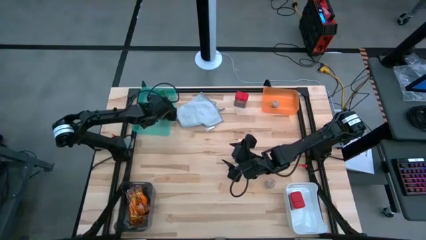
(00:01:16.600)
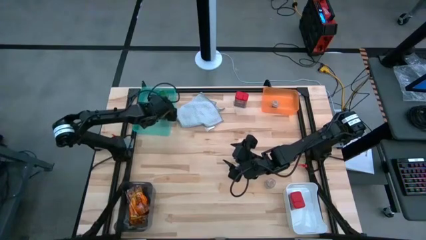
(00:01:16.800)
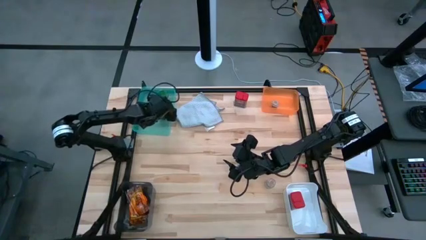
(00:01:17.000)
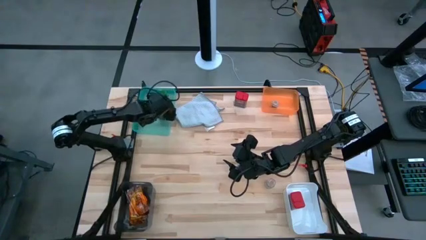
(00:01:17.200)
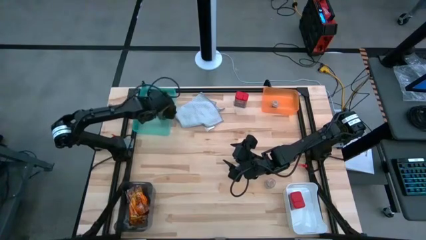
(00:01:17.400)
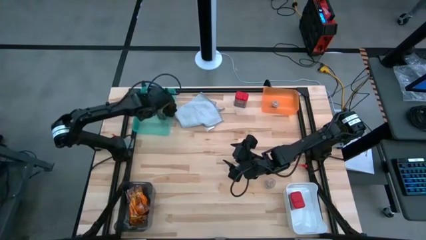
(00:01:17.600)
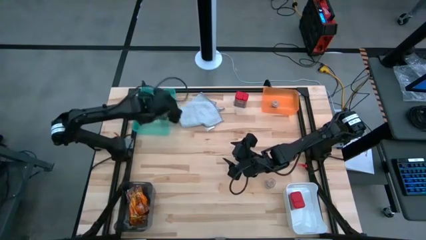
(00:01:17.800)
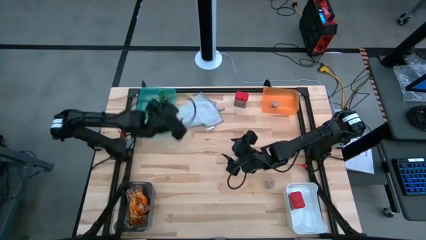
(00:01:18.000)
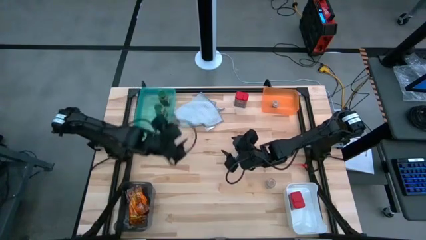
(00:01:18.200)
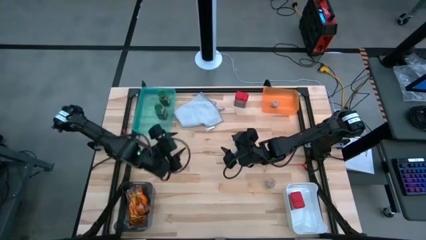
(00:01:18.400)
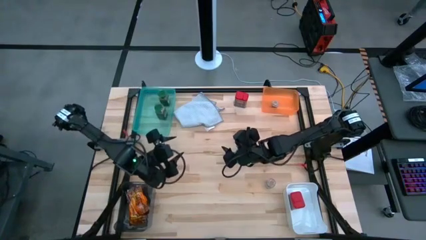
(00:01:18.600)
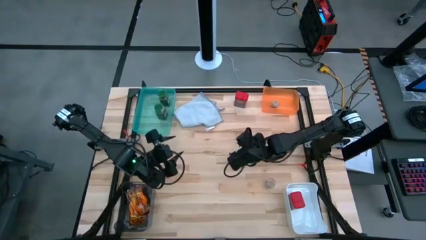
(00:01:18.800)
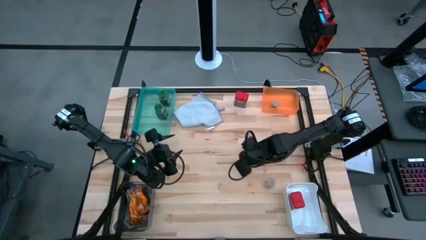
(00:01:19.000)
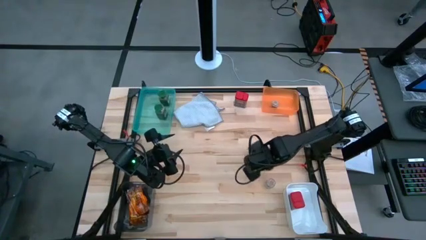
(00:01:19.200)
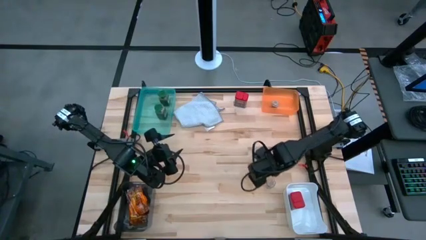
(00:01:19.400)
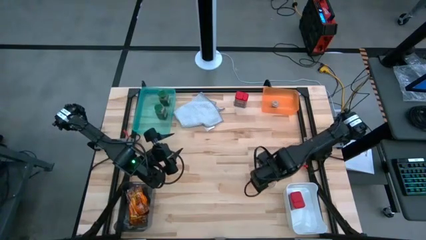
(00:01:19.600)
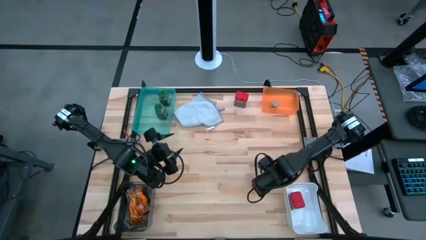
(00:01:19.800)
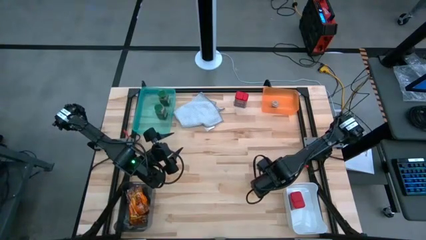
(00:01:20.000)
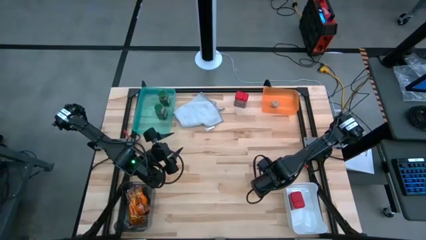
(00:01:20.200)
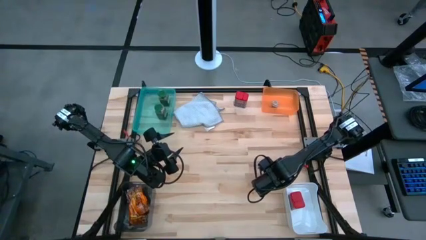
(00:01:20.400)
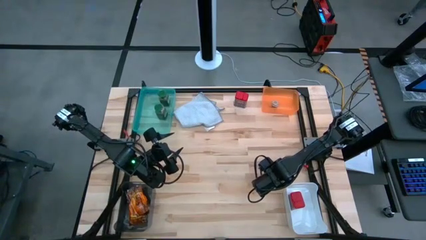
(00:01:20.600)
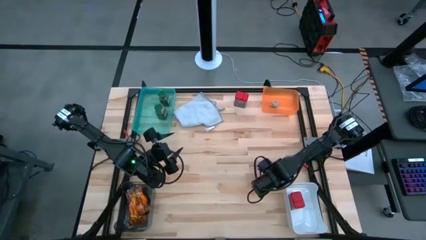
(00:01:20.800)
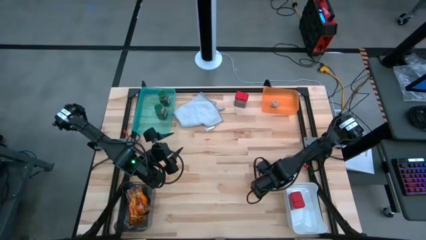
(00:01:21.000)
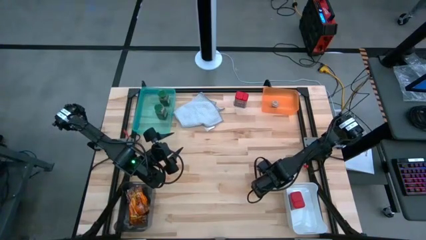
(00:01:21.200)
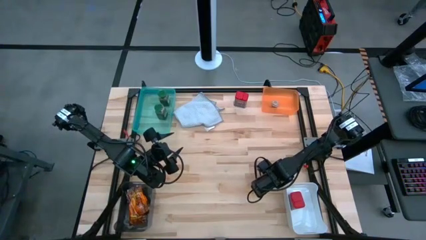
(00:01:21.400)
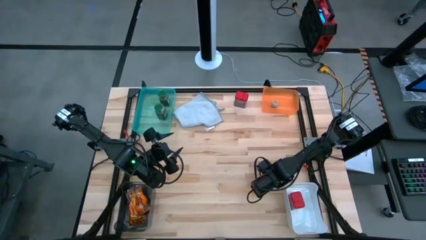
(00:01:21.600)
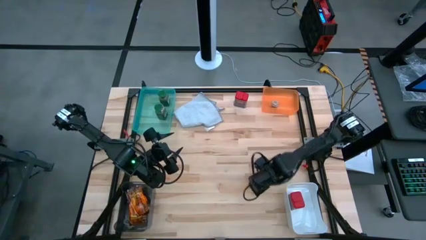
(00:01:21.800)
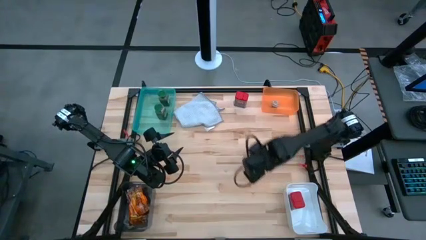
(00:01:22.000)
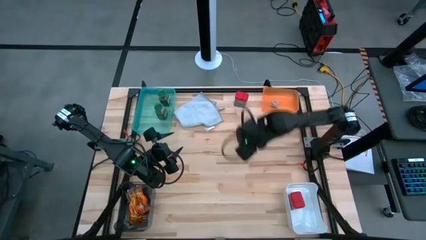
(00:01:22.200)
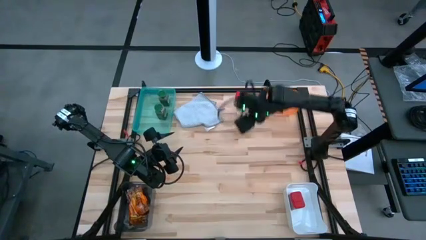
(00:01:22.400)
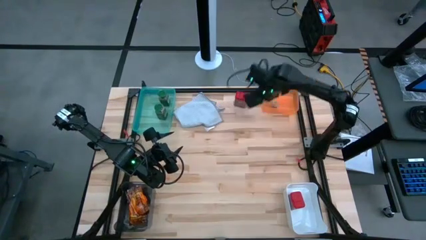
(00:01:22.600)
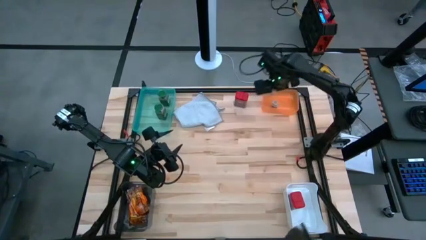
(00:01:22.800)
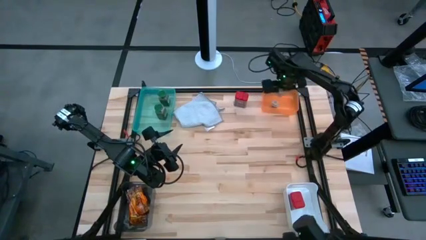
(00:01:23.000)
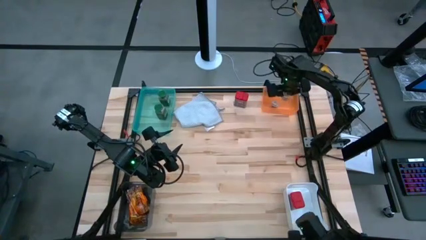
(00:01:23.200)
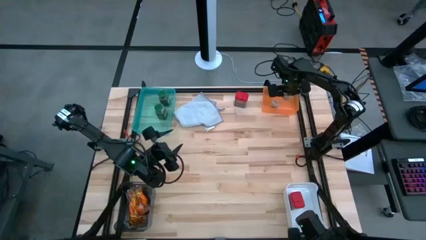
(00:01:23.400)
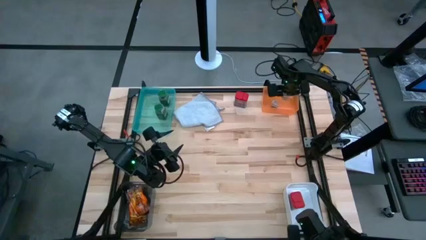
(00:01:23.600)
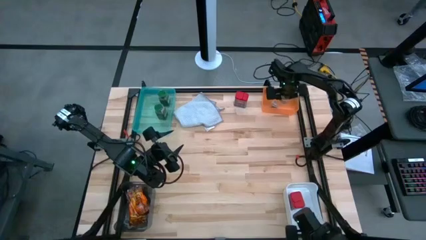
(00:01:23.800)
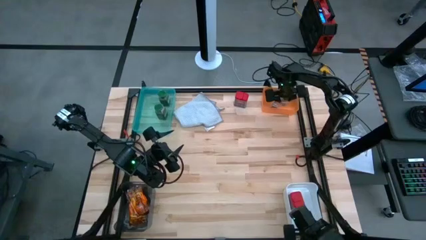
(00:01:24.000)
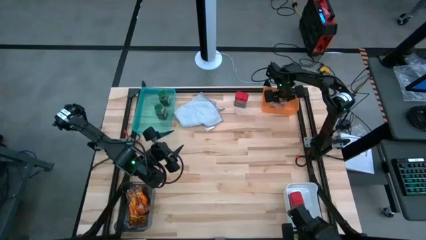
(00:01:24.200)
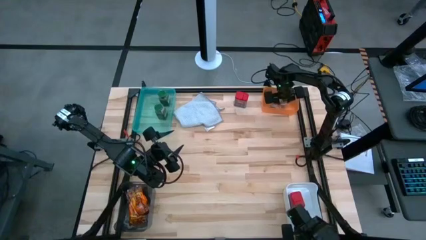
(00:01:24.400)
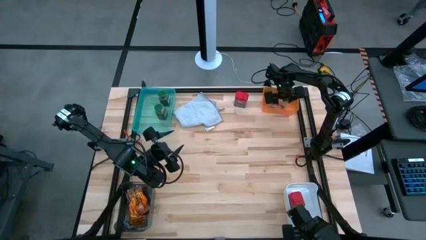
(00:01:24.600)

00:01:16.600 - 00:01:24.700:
Task: Sort spices by type
Put the brown seasoning bottle into the orange bin

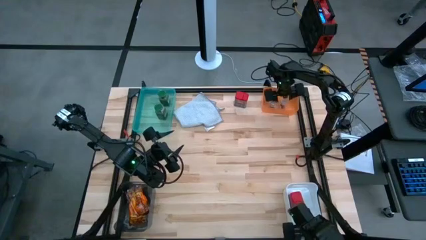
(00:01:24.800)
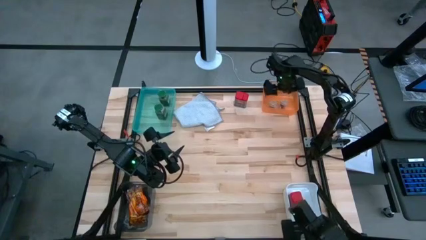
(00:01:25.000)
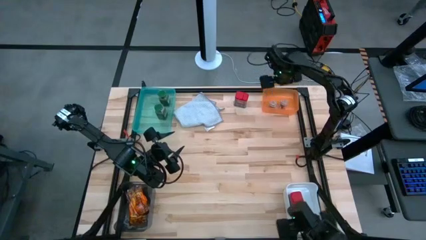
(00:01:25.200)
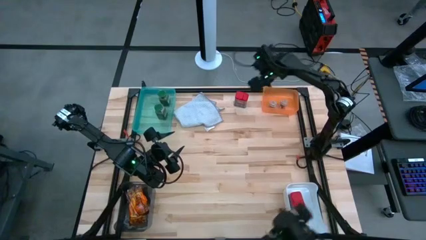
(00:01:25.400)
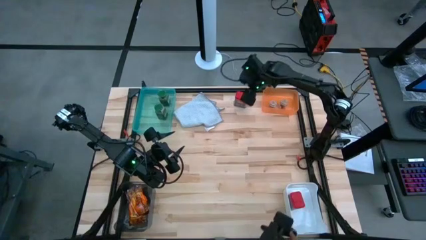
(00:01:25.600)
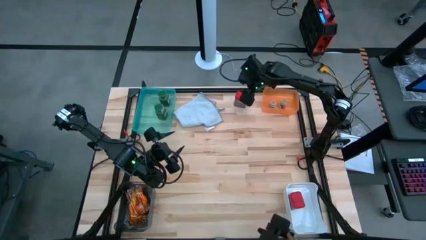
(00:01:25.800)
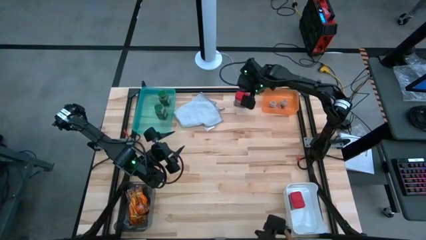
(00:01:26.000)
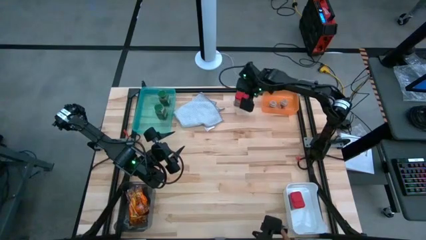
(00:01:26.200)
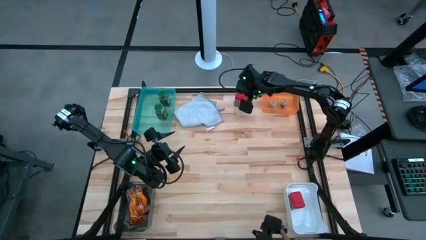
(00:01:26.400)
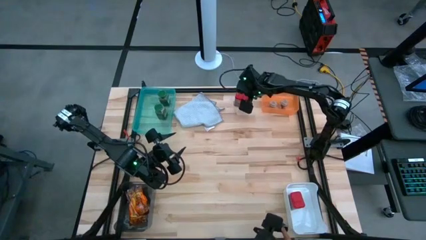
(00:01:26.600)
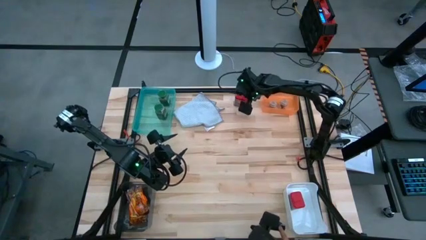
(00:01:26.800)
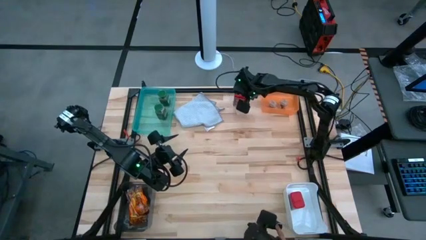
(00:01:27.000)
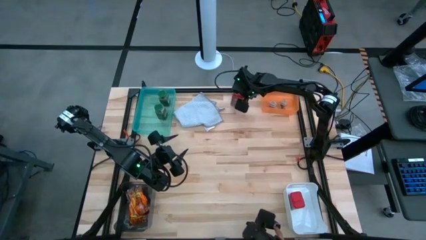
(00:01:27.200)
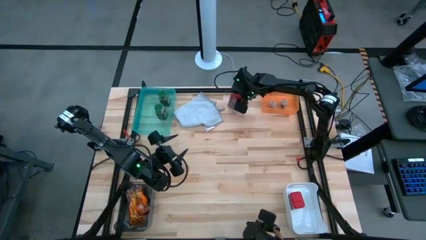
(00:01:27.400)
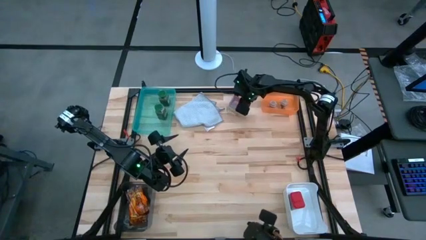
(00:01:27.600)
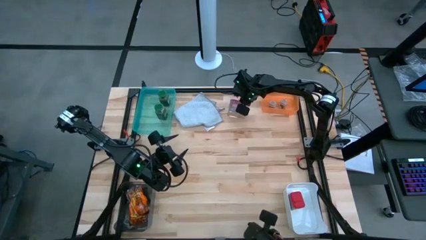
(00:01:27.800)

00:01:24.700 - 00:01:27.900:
Put the red seasoning can into the white bin
